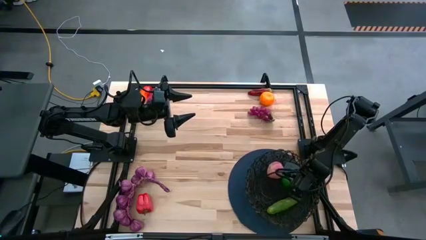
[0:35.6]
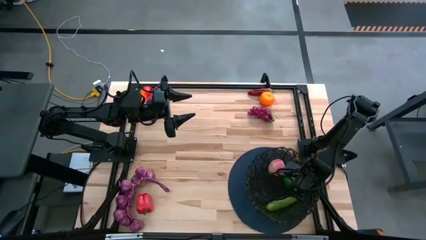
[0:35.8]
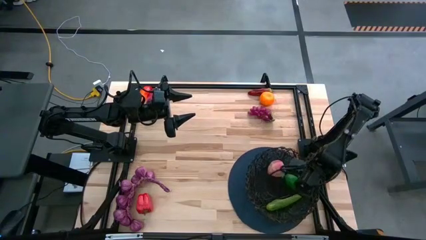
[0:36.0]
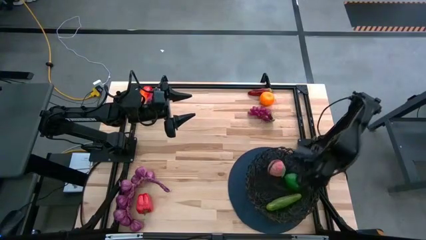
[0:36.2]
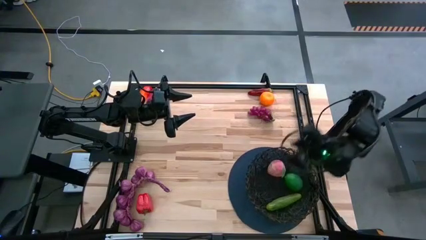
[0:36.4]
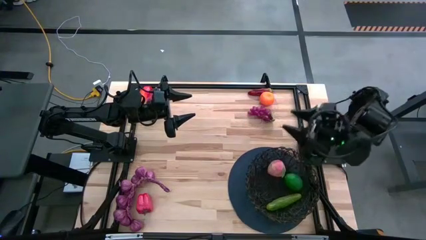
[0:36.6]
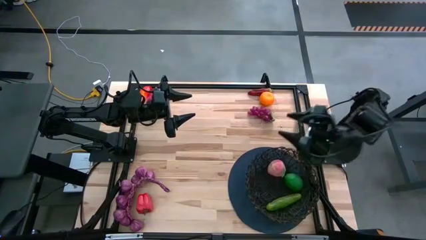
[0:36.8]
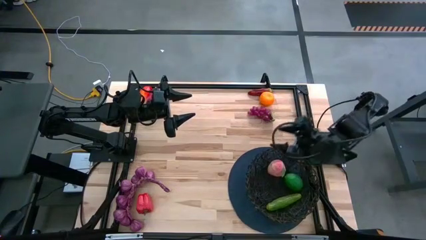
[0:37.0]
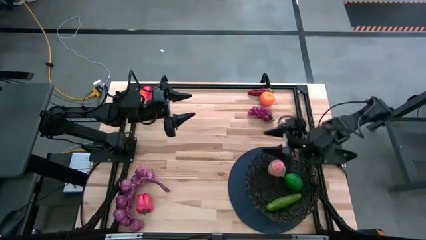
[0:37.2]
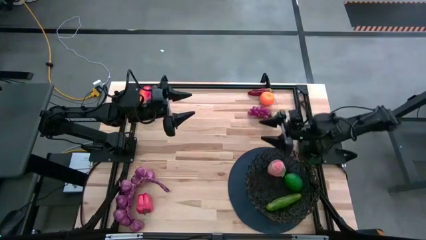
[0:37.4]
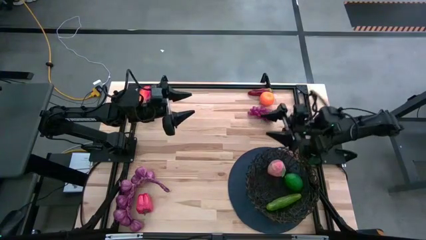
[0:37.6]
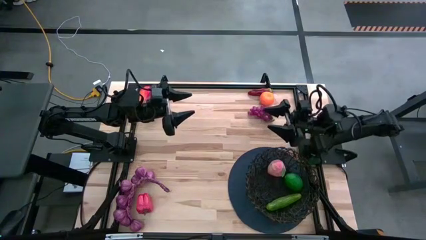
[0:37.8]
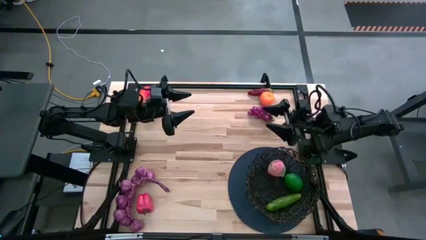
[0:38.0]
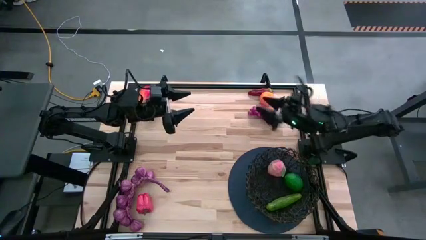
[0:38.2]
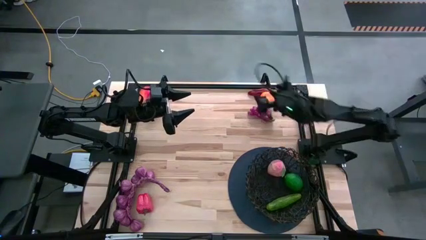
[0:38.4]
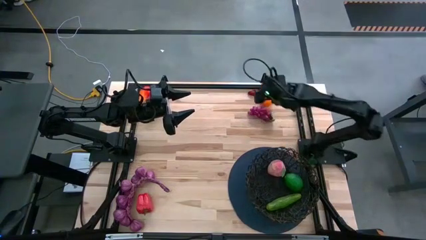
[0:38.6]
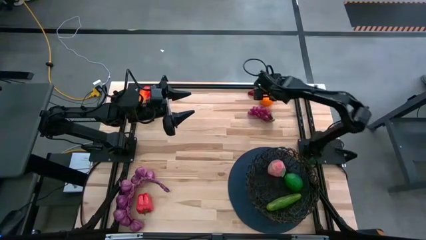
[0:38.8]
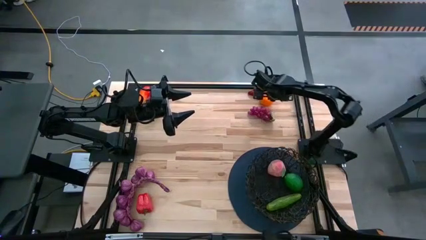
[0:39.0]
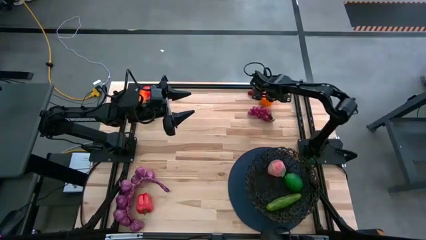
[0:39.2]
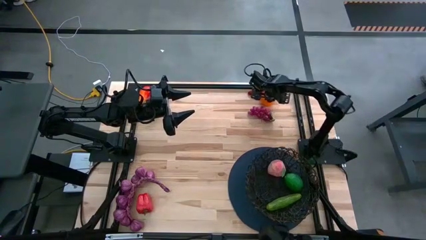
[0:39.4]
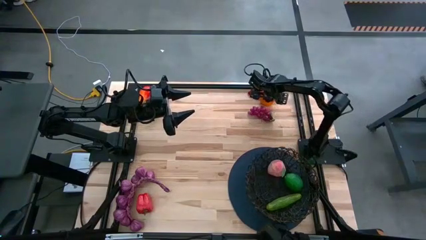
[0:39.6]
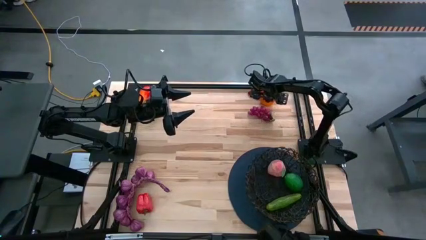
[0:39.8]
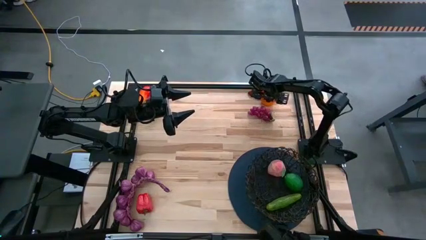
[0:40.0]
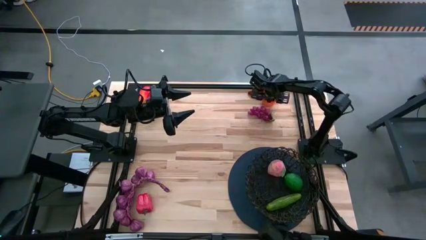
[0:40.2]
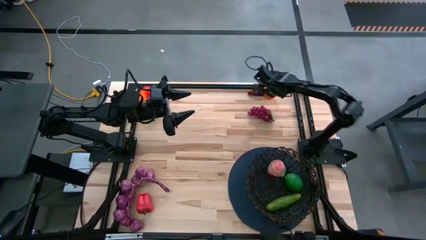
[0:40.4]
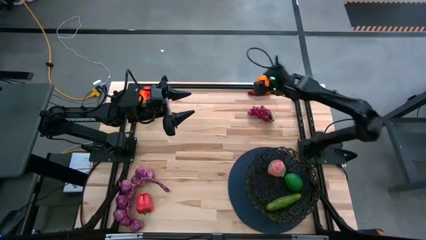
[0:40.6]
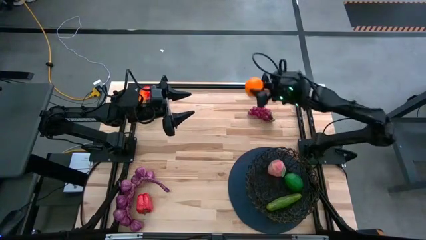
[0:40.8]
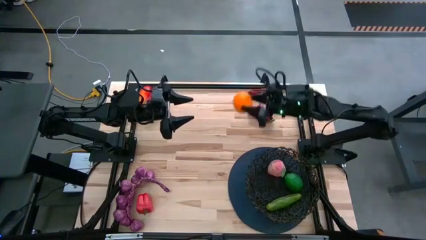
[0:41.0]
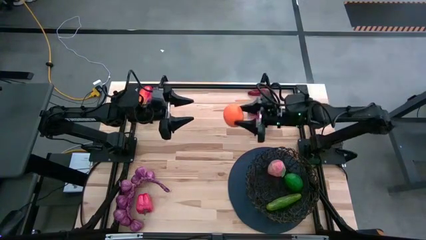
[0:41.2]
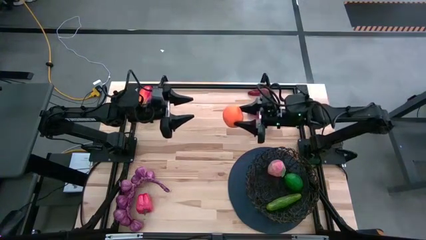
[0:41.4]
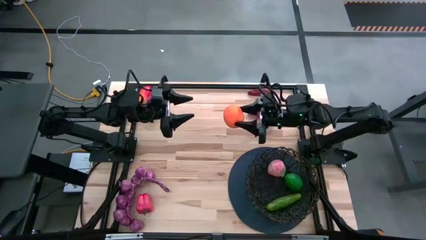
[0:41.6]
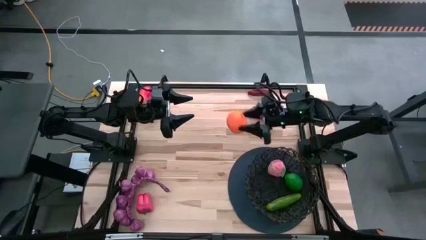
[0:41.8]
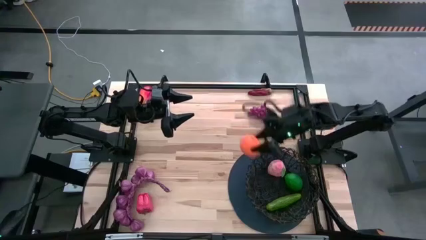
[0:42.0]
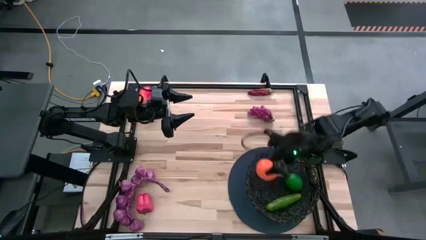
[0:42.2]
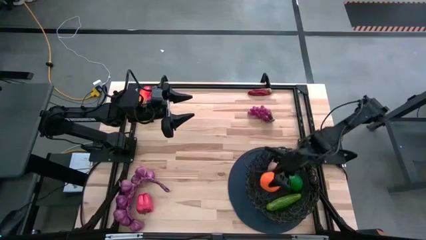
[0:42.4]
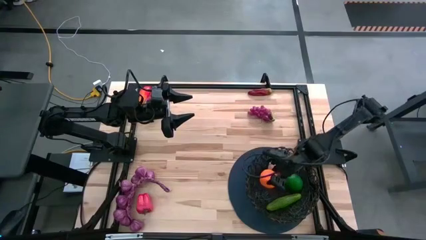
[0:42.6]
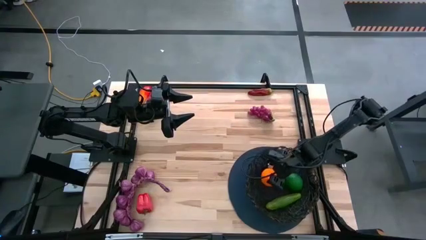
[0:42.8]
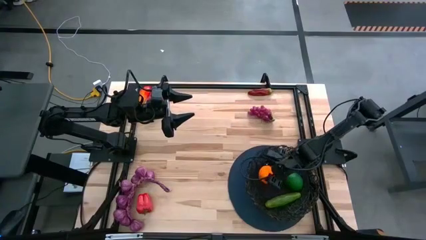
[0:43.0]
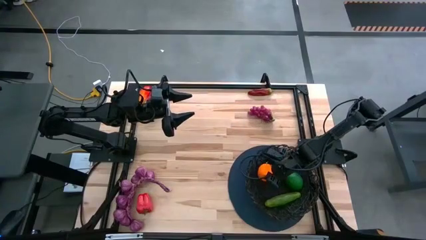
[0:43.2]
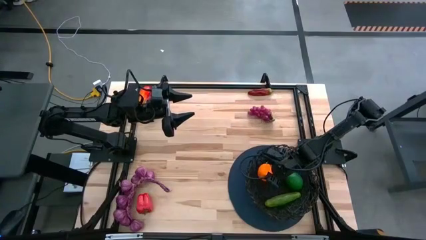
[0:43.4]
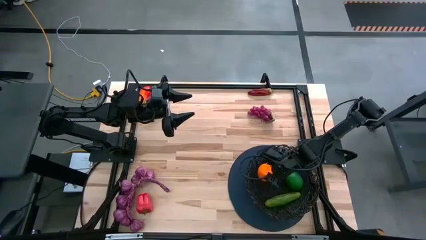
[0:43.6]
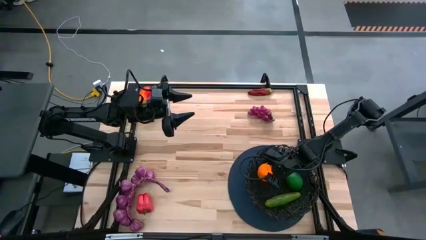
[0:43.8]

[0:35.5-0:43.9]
Task: Build produce basket
Put the orange into the basket

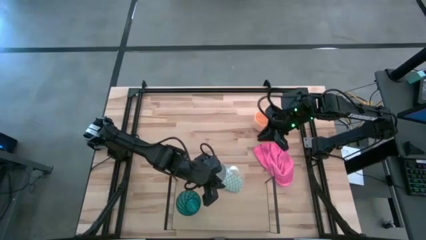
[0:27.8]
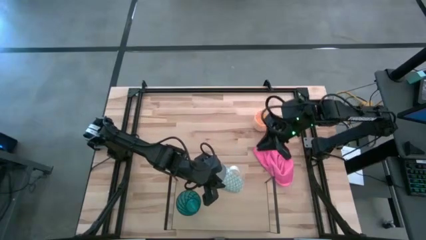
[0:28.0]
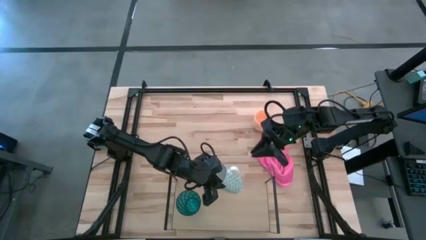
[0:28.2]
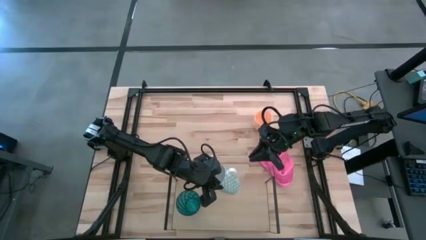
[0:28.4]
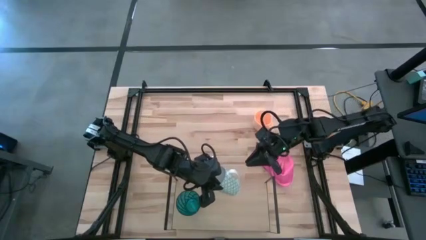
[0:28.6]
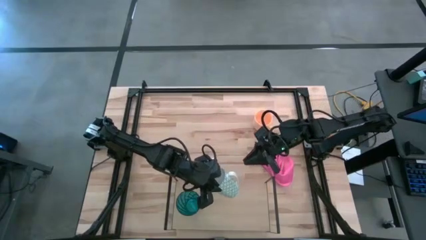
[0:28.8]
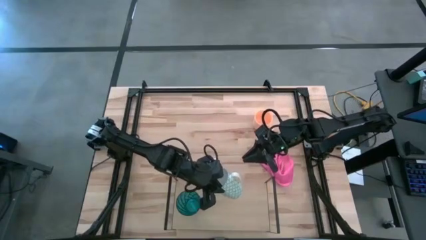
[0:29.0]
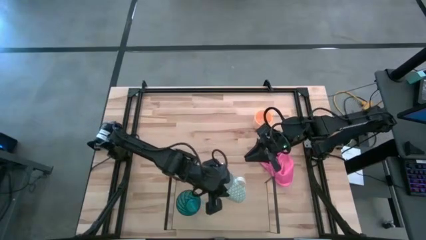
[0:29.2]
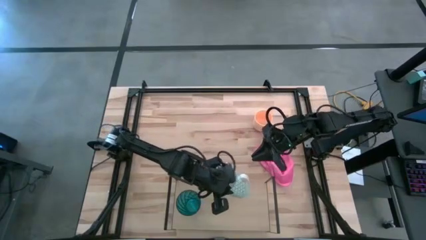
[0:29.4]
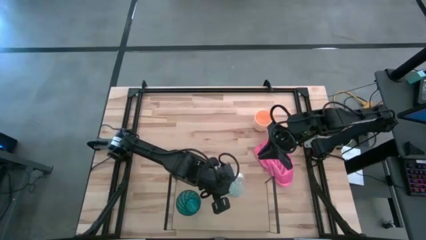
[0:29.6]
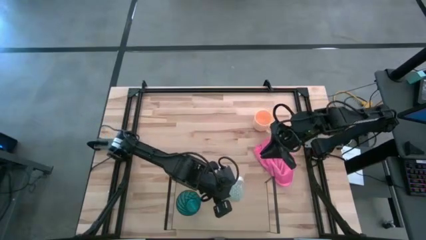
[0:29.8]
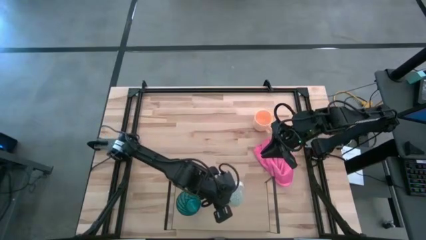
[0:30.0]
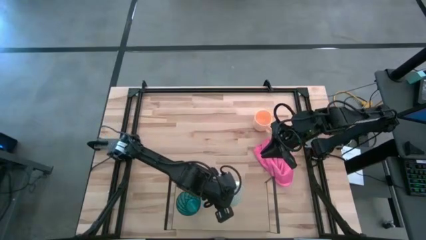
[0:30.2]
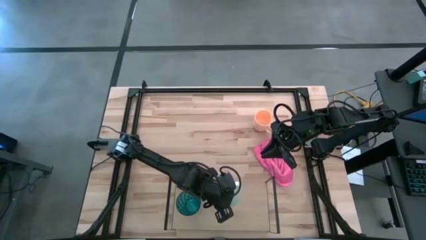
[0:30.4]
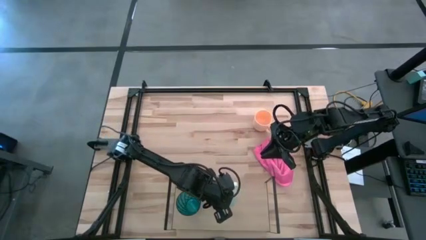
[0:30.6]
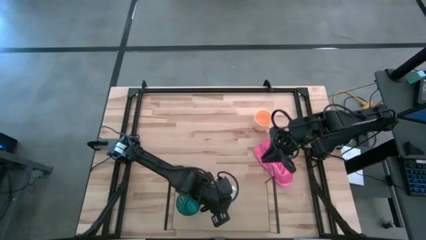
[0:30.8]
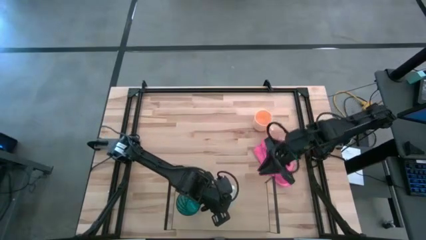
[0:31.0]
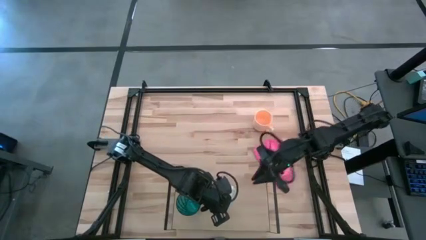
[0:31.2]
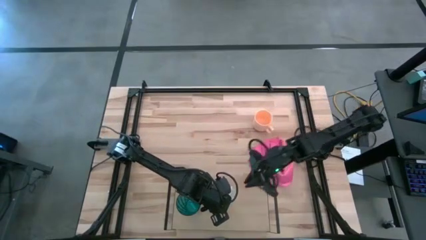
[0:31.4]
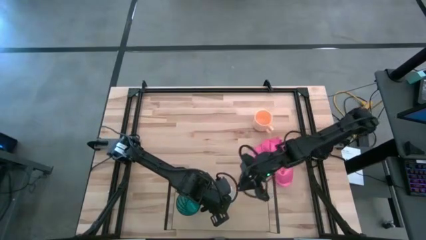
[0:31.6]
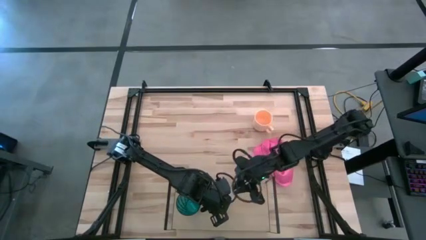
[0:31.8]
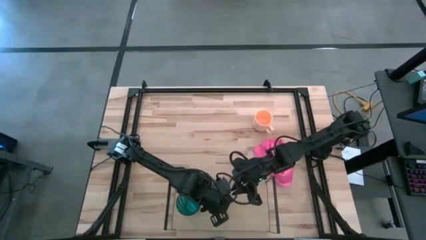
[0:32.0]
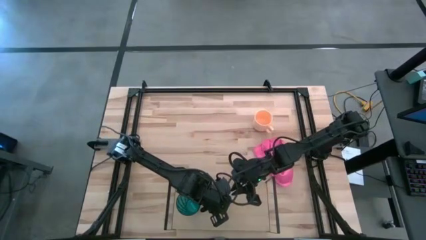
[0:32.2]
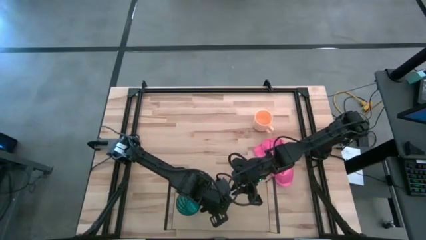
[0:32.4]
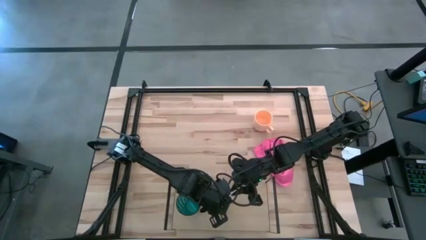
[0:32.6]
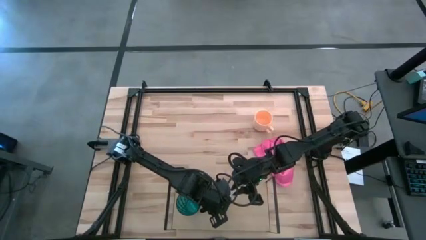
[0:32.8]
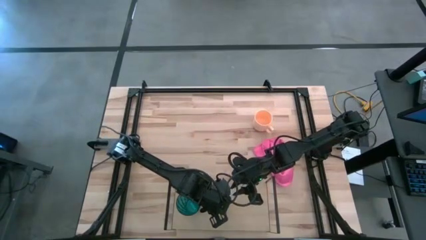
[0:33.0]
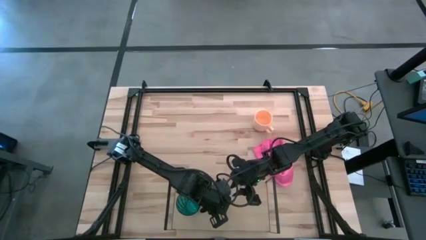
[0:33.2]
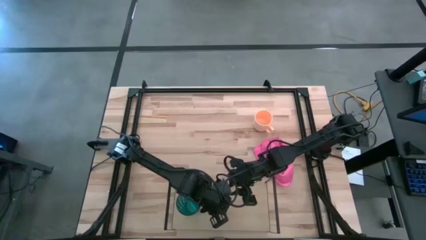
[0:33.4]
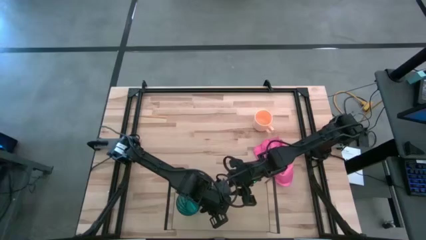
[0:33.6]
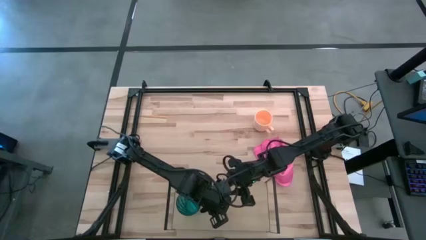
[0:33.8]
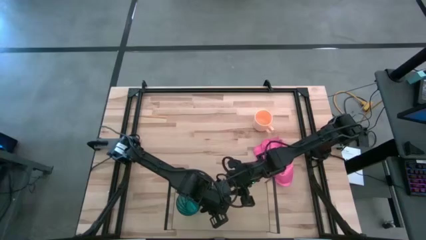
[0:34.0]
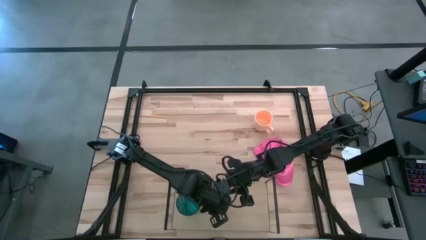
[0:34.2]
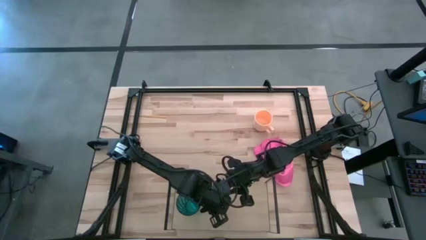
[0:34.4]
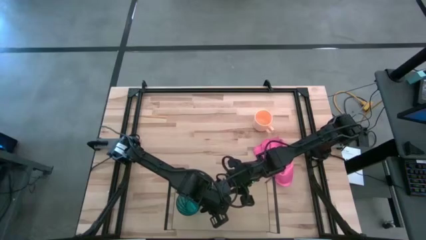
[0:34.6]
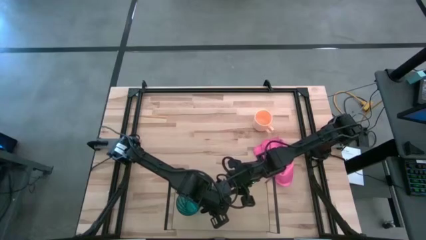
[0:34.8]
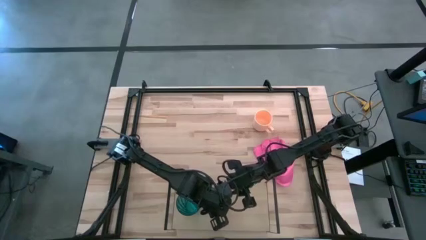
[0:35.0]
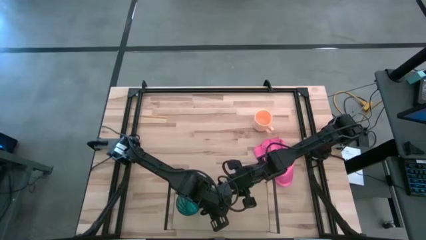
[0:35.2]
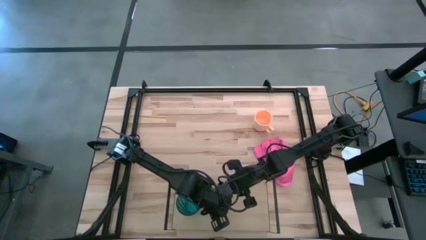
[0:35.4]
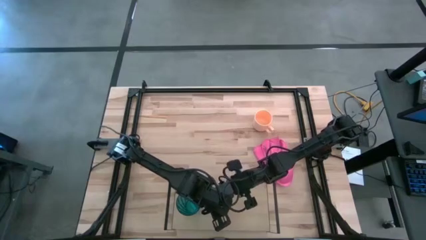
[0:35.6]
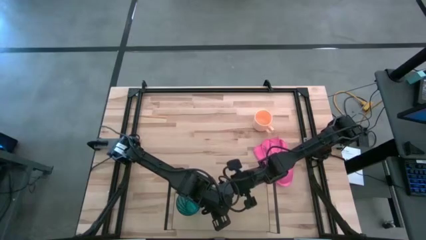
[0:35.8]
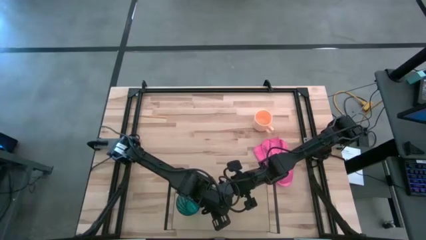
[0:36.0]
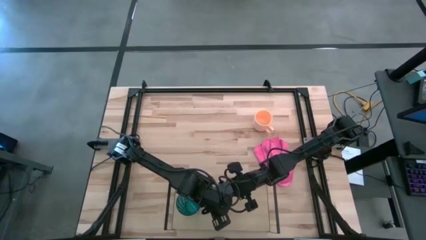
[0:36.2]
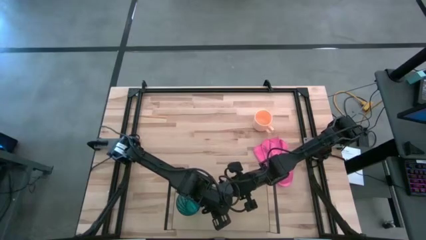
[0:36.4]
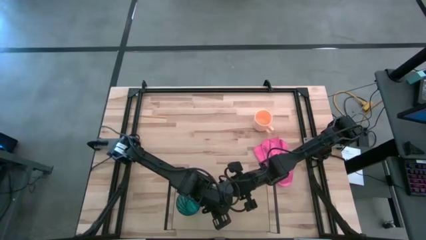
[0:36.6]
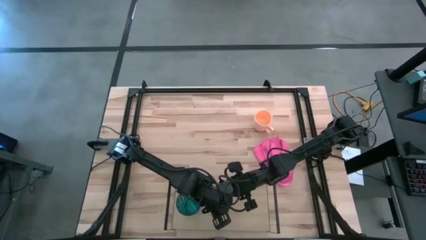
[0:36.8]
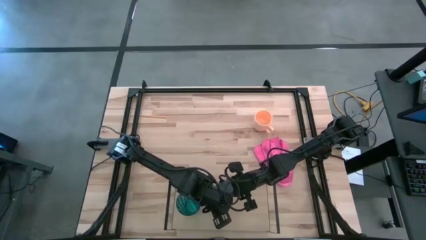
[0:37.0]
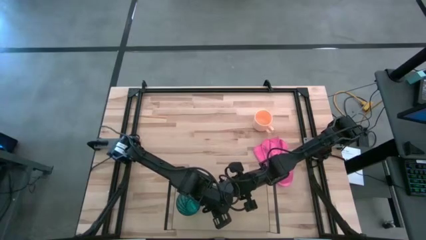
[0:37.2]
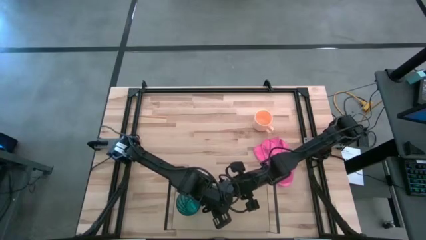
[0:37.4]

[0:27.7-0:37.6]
Task: Stack small to large cups/mugs on shelf
Put the white mug on the shelf
